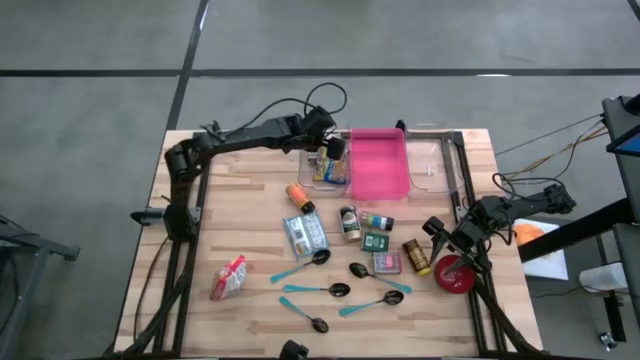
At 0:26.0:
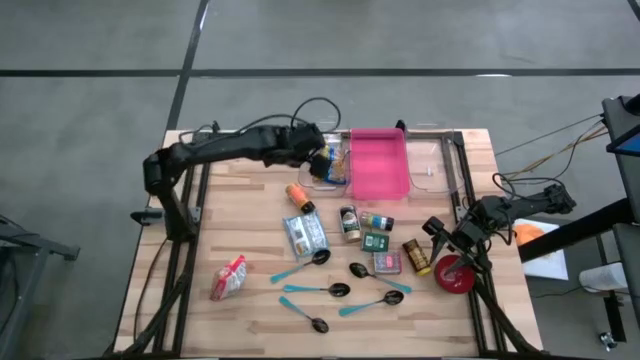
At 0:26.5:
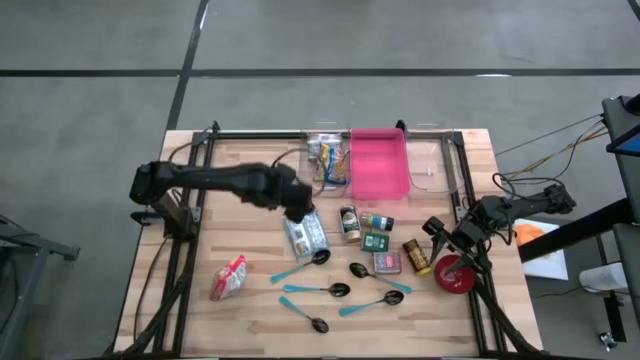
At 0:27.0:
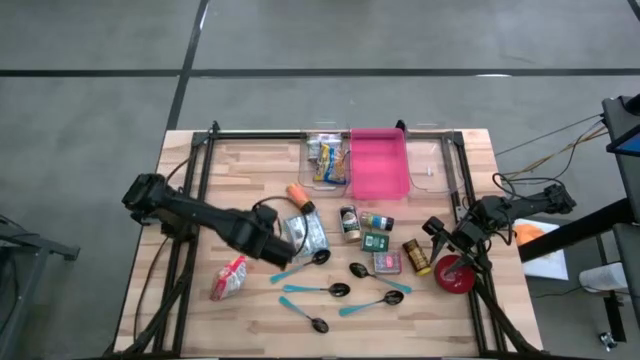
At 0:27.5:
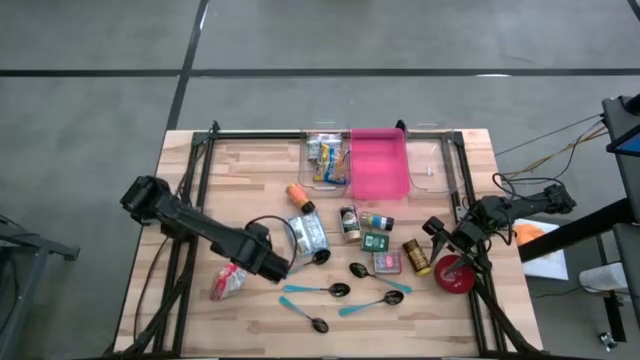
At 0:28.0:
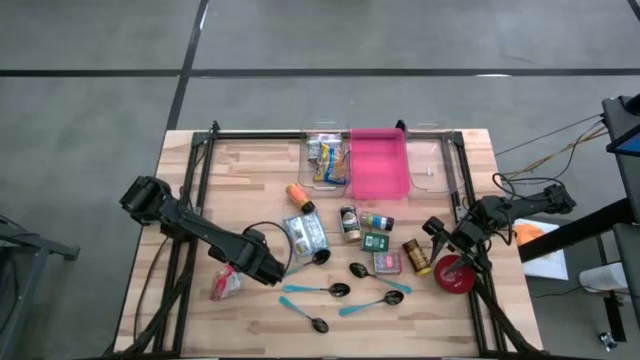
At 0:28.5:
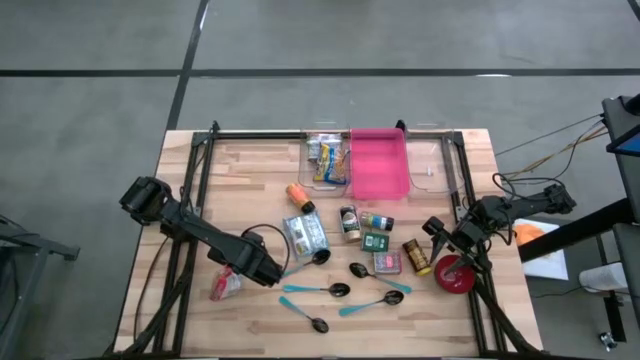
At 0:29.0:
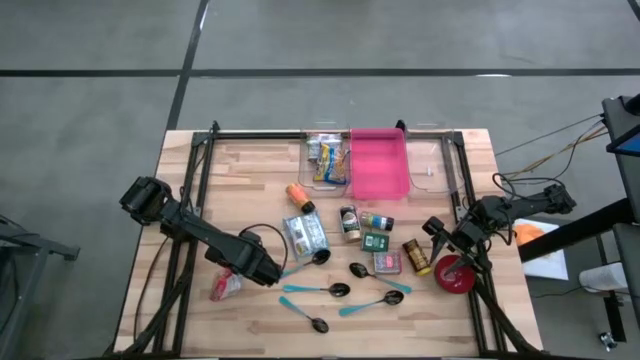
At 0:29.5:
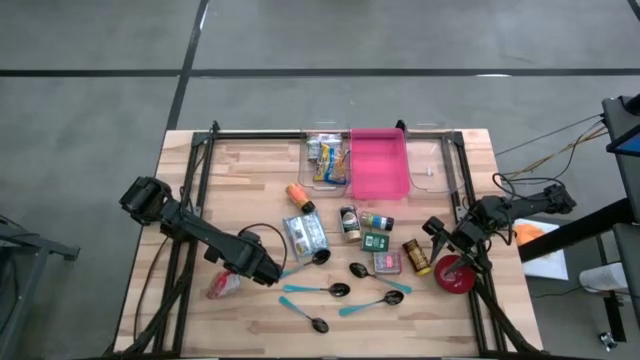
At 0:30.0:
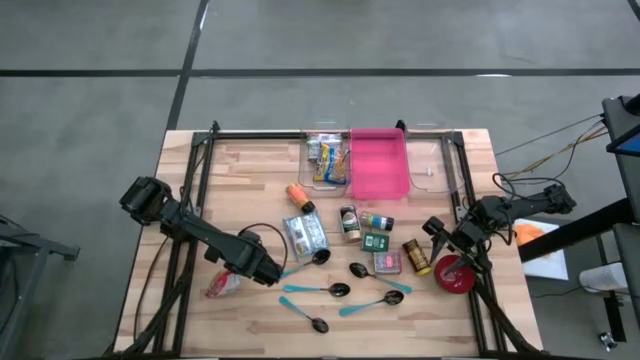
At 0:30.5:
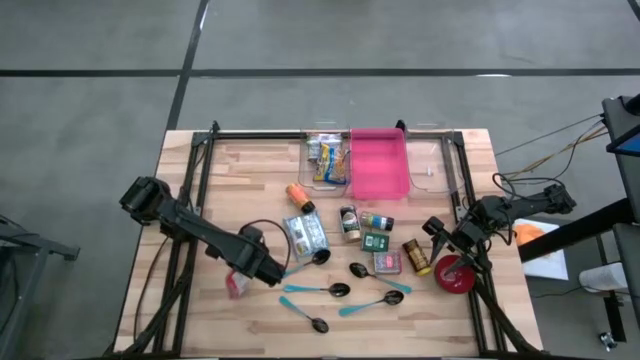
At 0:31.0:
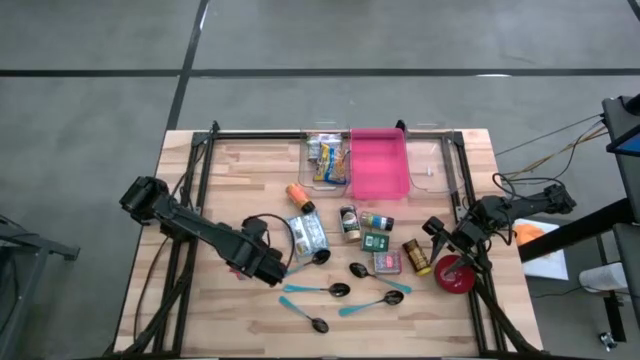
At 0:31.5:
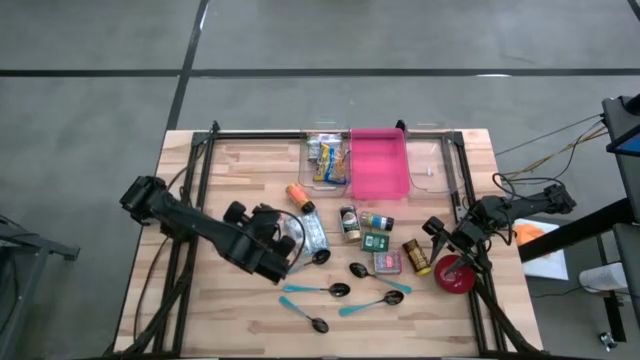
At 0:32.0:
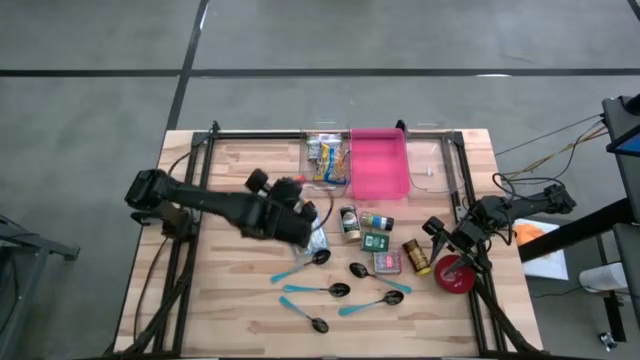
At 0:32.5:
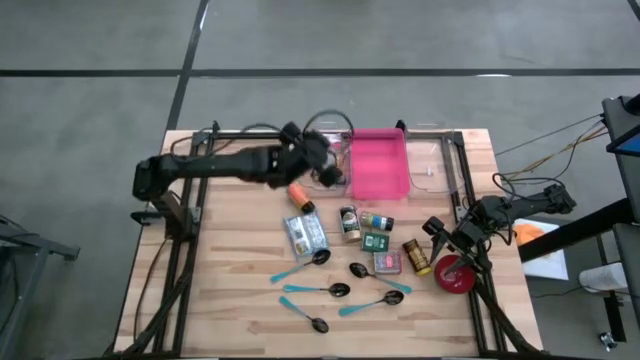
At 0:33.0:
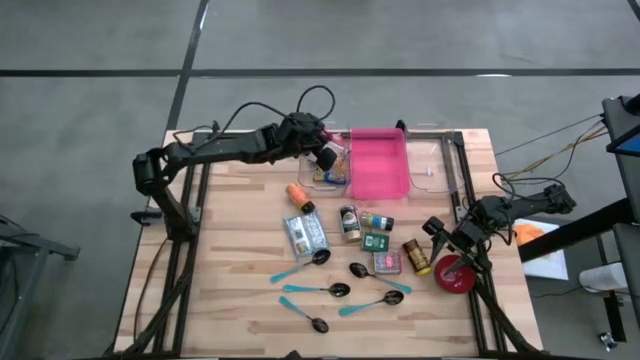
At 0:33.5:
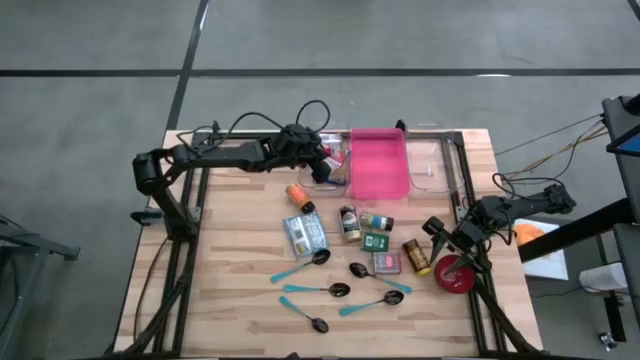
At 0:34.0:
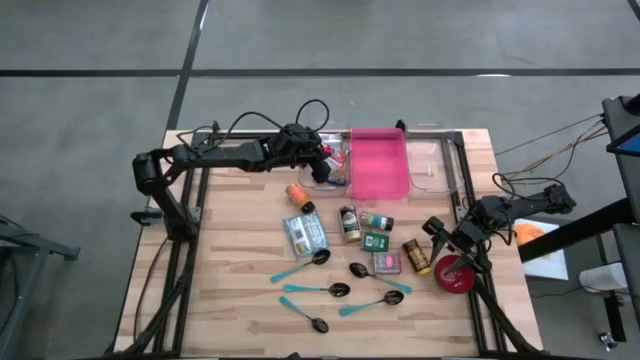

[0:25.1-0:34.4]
Put the red noodle pack into the left transparent bin

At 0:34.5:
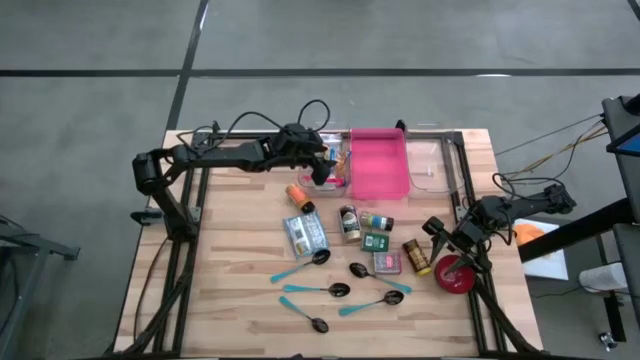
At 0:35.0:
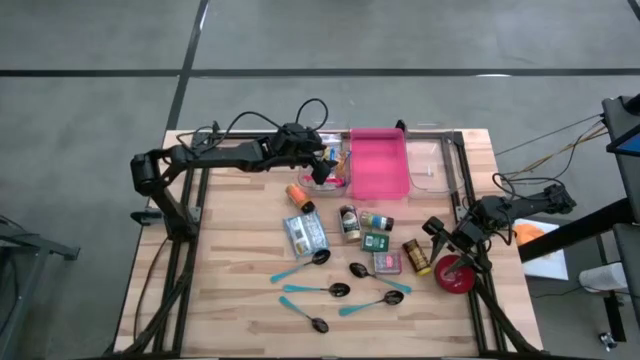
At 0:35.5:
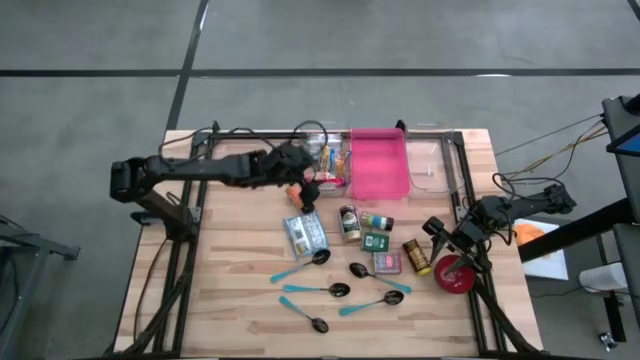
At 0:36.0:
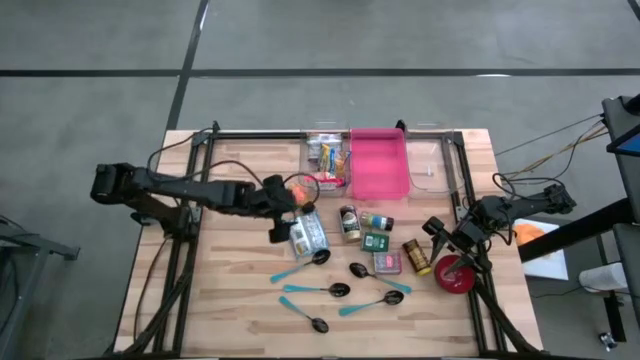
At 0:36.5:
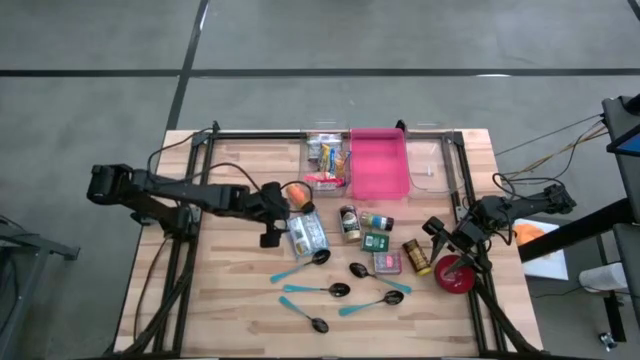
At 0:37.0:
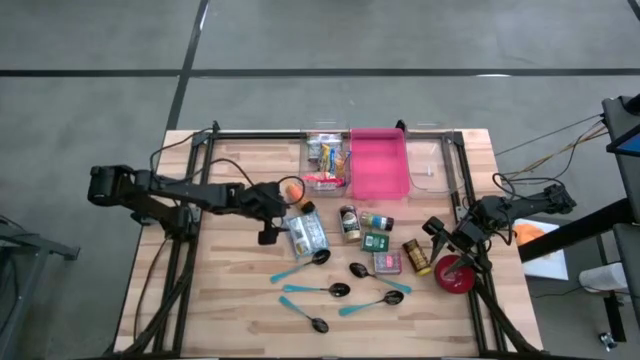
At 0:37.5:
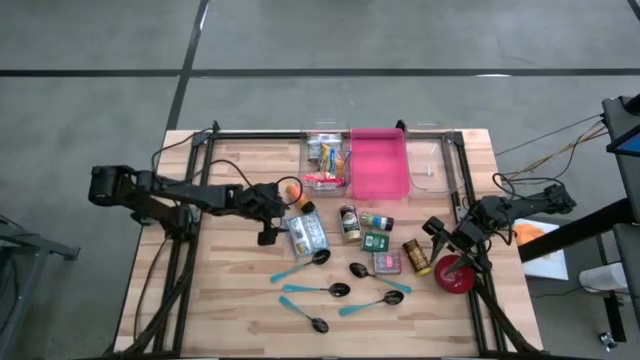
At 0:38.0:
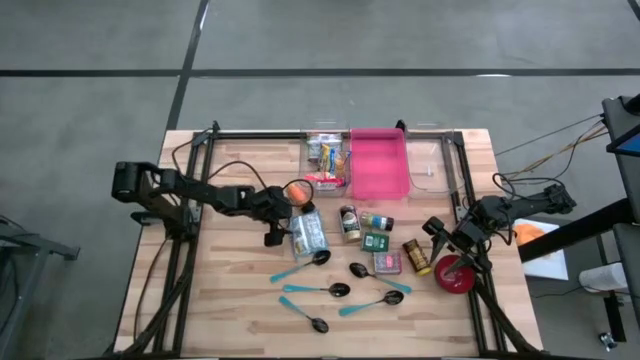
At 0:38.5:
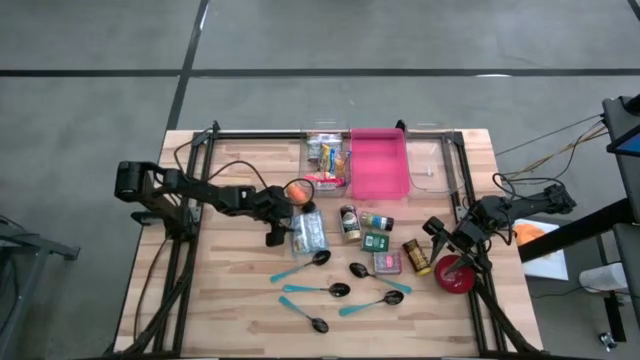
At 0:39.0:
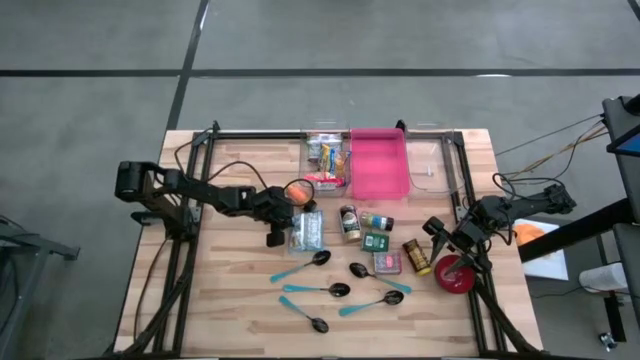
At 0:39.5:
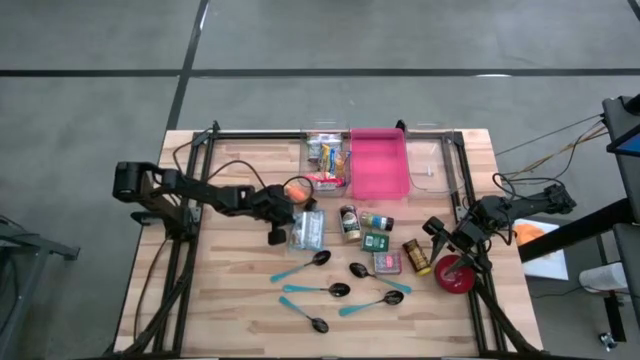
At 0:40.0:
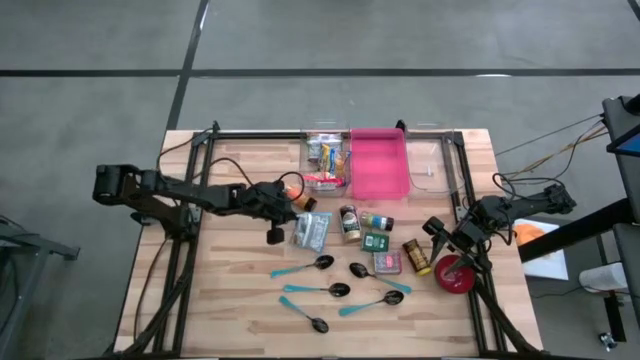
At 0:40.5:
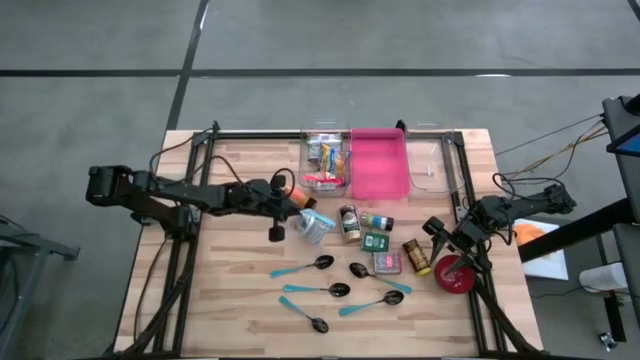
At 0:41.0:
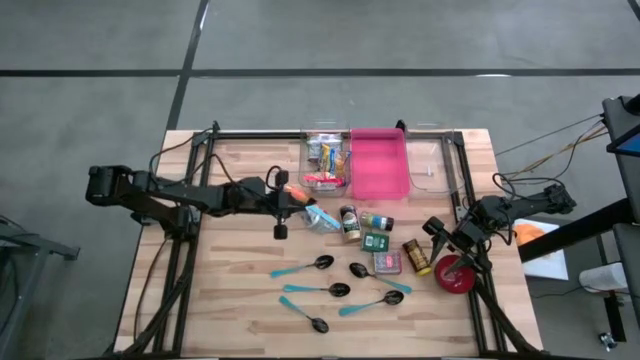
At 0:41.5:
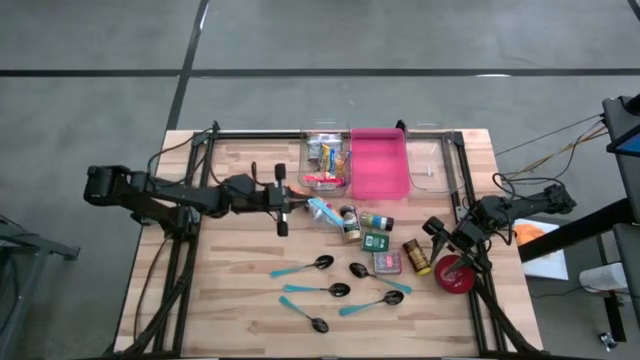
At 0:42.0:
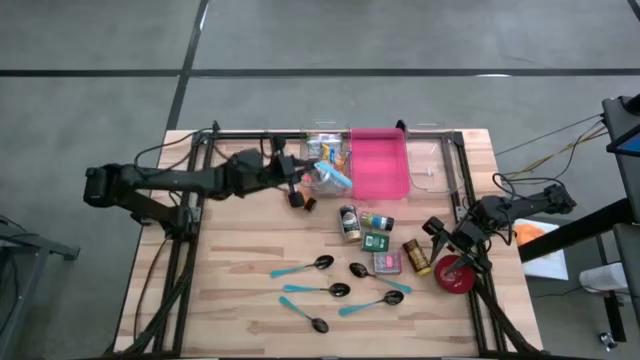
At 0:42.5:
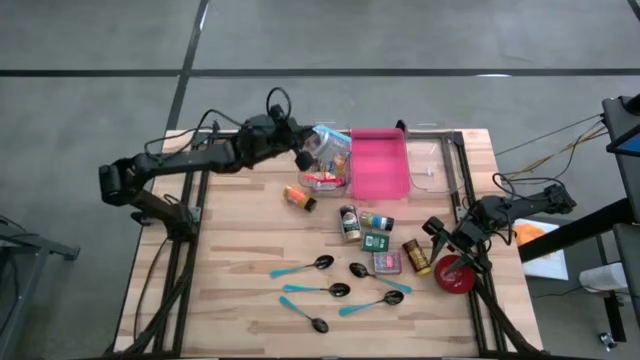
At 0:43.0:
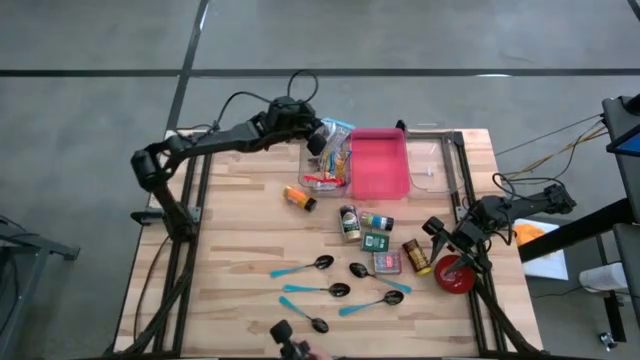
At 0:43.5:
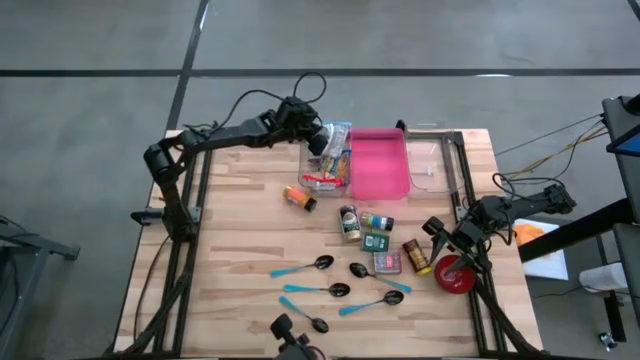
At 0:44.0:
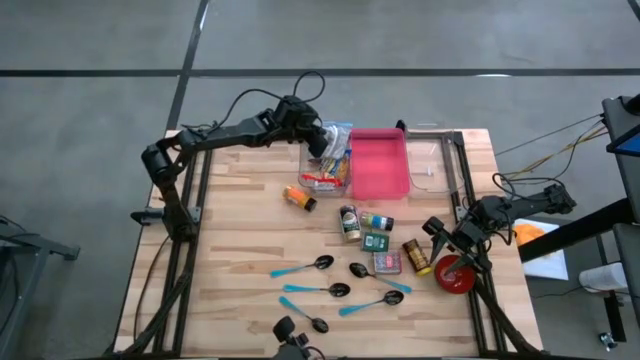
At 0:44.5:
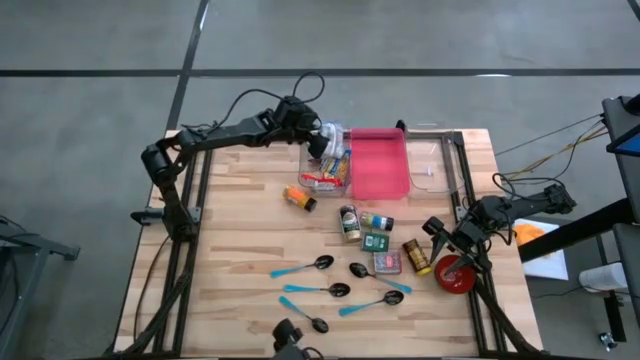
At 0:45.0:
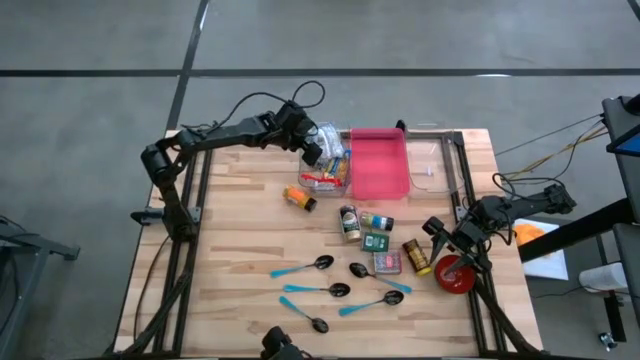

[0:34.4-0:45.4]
Put the light blue noodle pack into the left transparent bin

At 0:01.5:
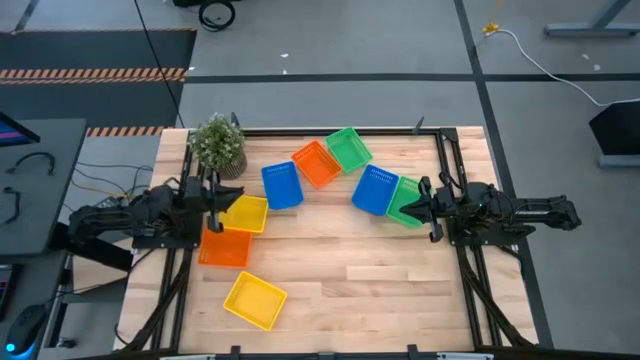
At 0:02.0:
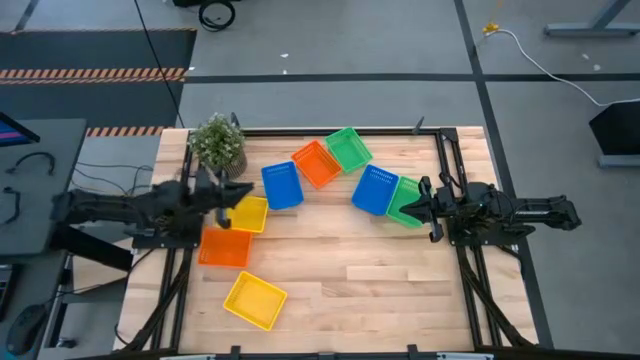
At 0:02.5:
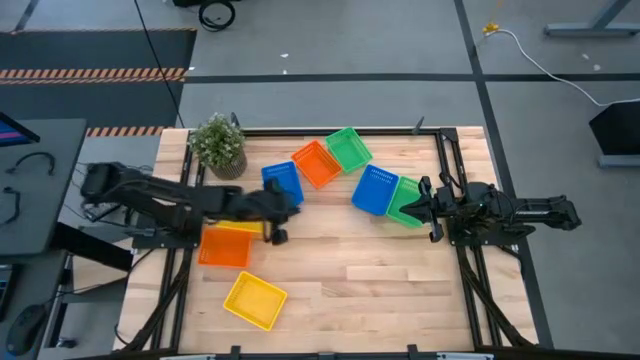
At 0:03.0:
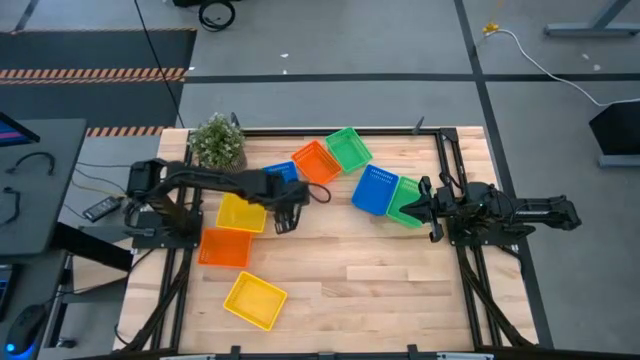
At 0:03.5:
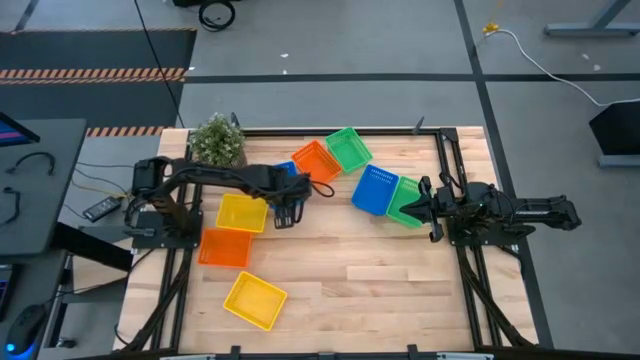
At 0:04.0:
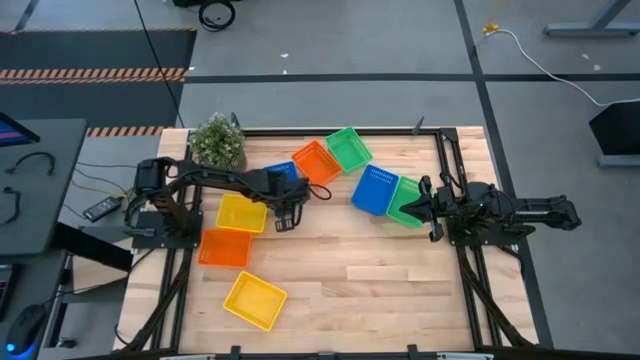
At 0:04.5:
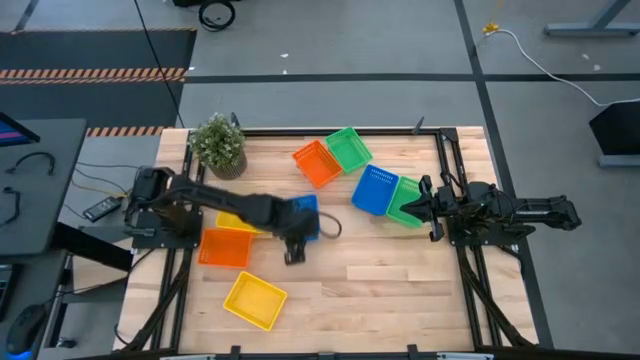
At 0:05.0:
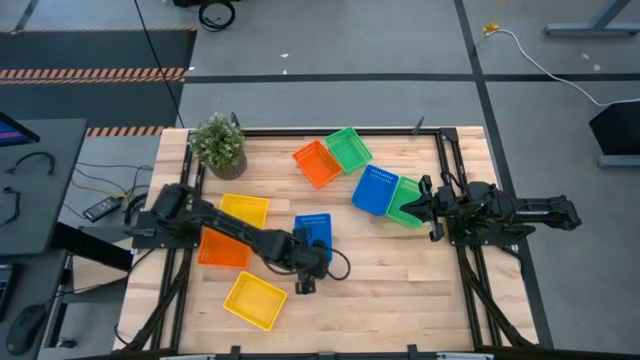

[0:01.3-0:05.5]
Move the left blue bin to the center of the table
